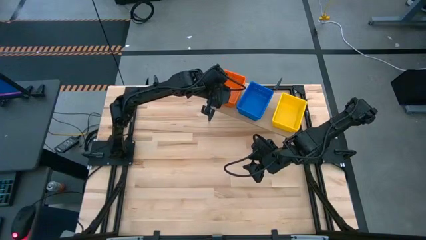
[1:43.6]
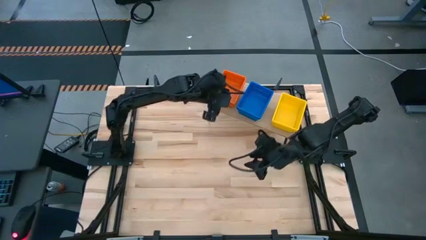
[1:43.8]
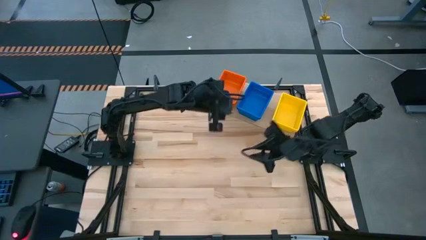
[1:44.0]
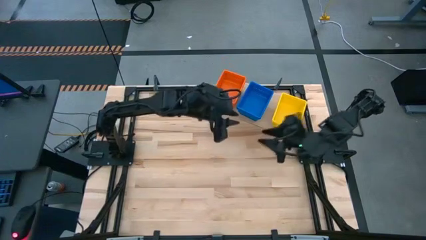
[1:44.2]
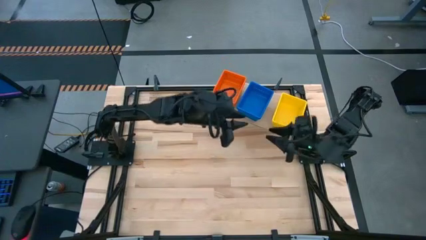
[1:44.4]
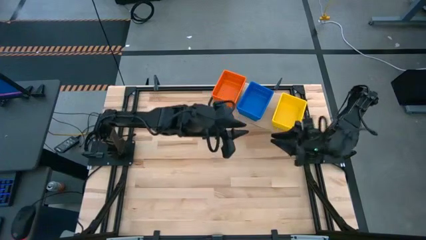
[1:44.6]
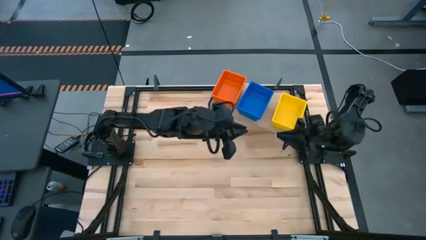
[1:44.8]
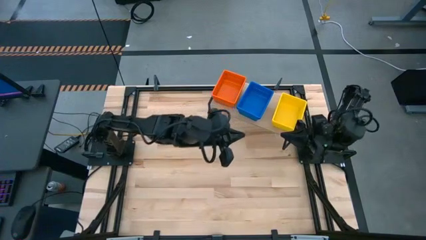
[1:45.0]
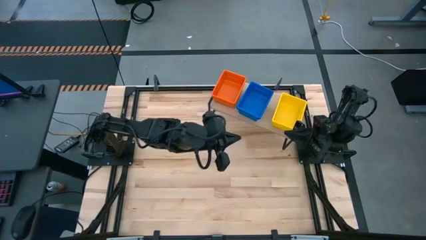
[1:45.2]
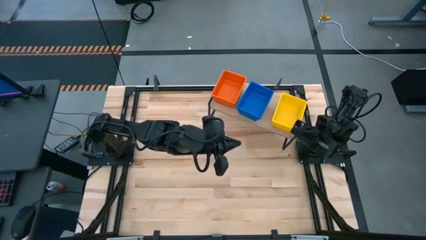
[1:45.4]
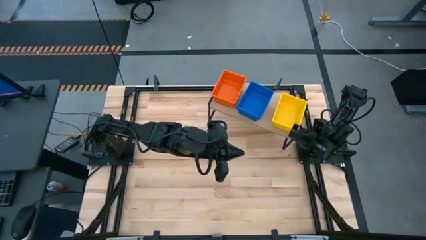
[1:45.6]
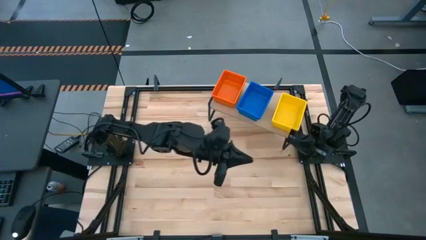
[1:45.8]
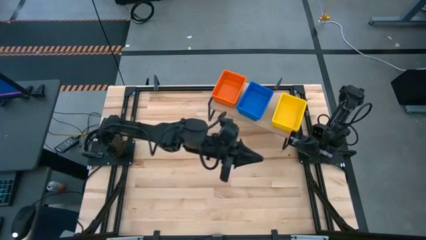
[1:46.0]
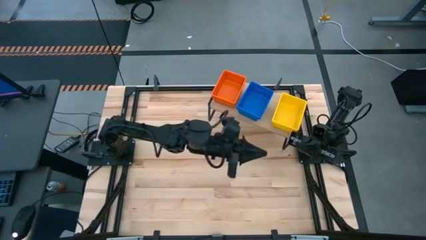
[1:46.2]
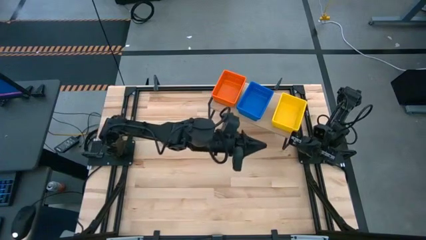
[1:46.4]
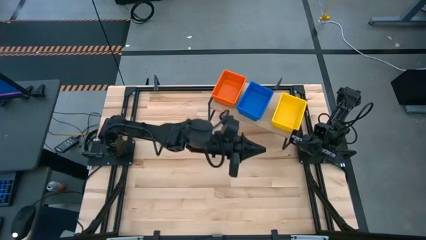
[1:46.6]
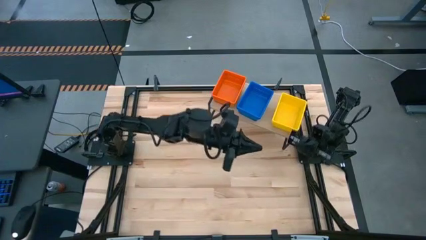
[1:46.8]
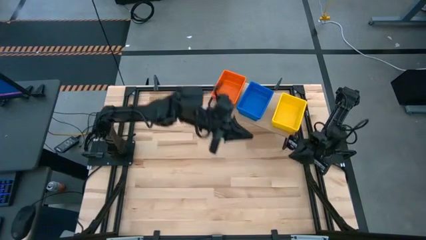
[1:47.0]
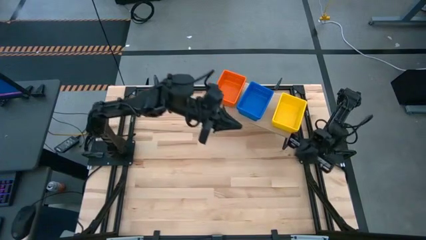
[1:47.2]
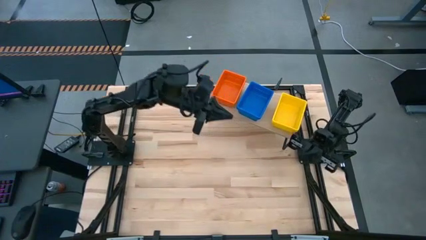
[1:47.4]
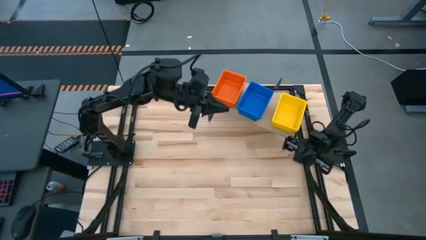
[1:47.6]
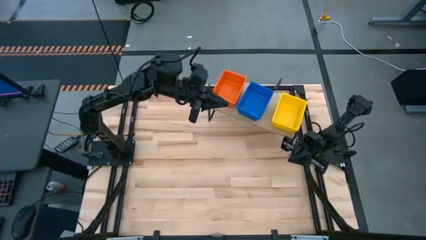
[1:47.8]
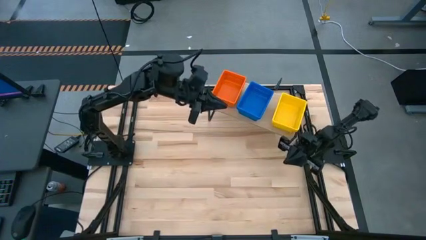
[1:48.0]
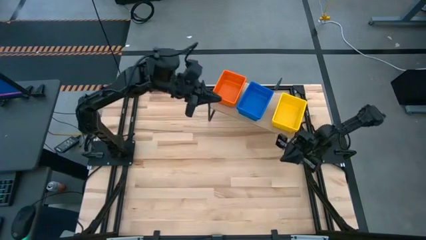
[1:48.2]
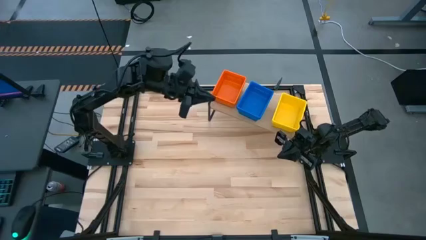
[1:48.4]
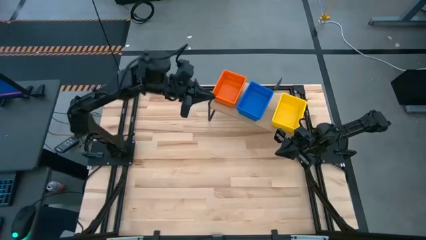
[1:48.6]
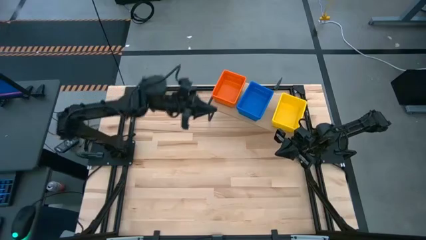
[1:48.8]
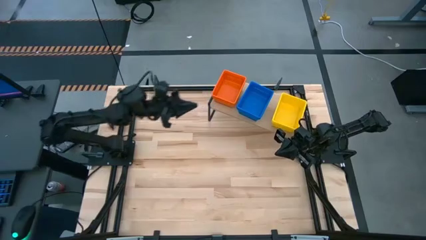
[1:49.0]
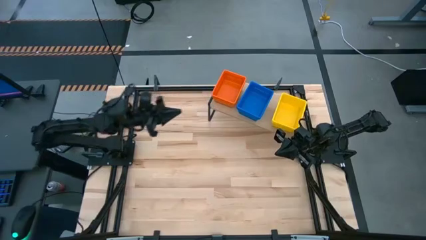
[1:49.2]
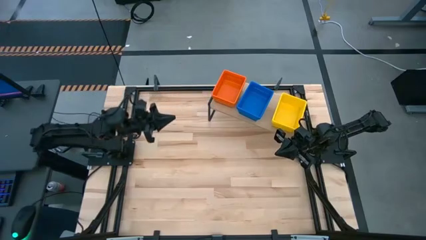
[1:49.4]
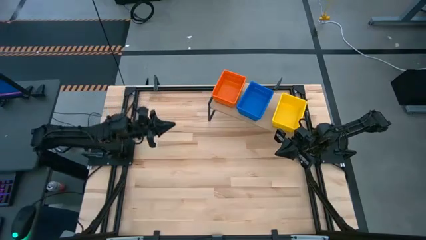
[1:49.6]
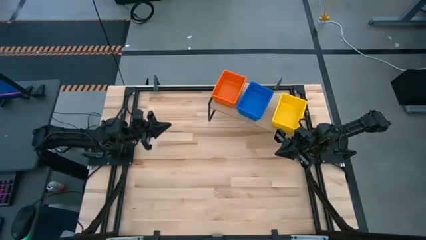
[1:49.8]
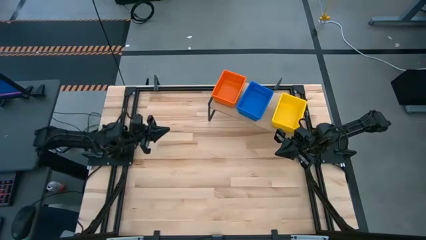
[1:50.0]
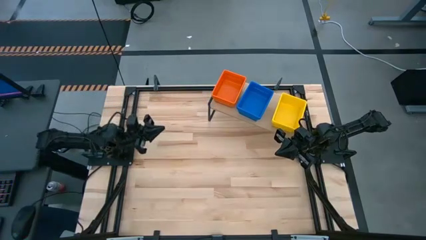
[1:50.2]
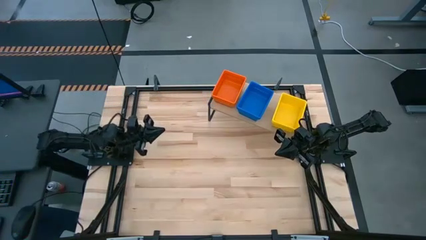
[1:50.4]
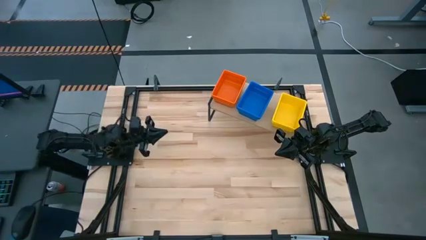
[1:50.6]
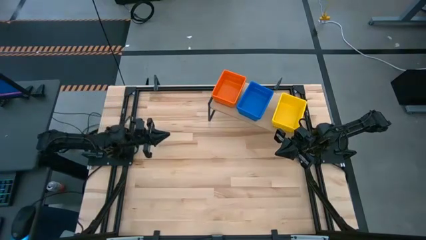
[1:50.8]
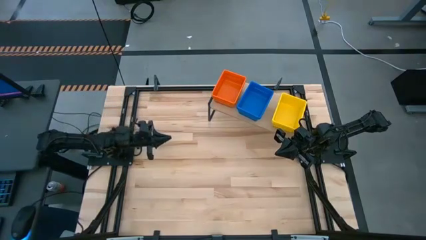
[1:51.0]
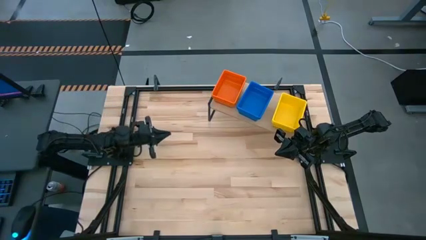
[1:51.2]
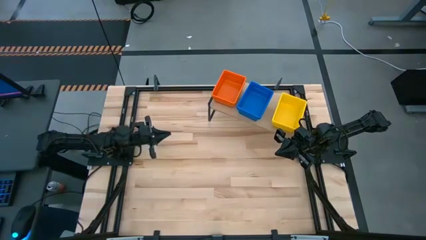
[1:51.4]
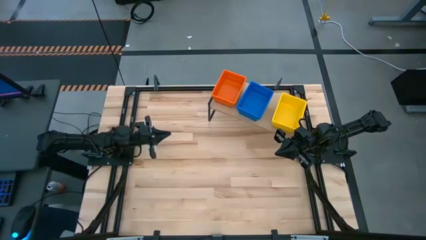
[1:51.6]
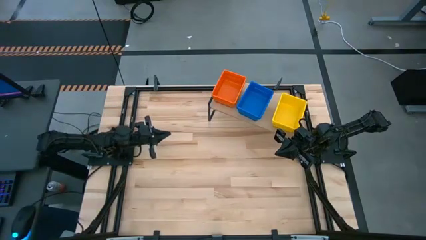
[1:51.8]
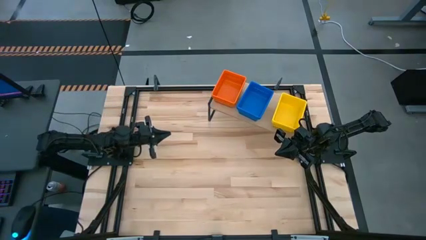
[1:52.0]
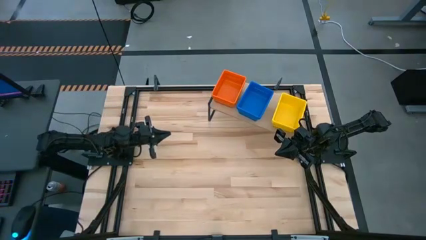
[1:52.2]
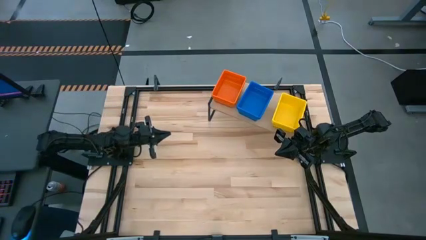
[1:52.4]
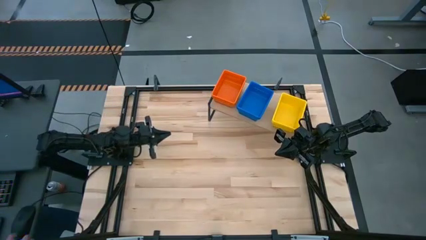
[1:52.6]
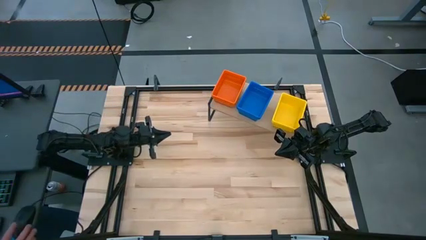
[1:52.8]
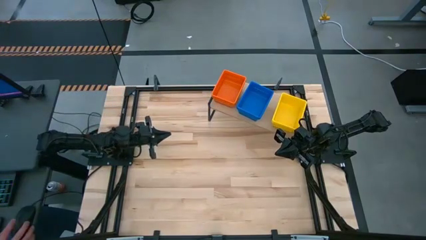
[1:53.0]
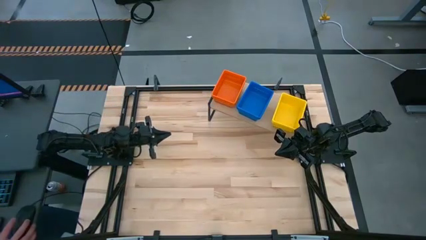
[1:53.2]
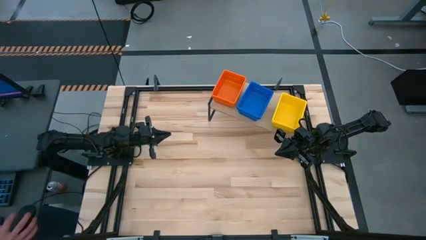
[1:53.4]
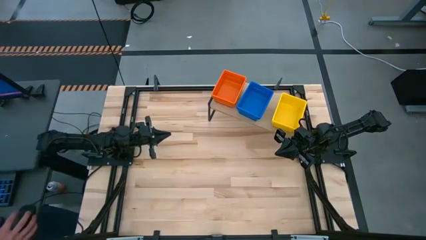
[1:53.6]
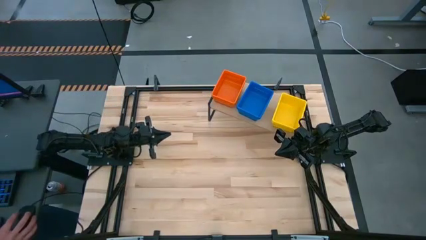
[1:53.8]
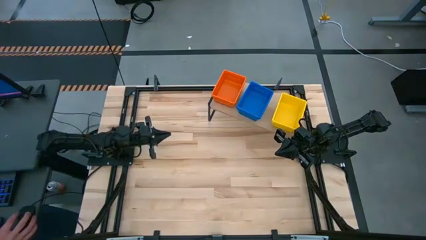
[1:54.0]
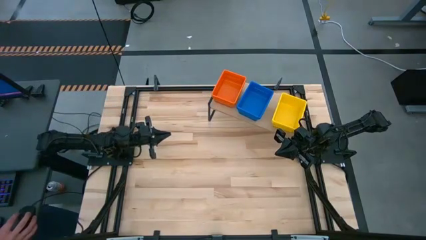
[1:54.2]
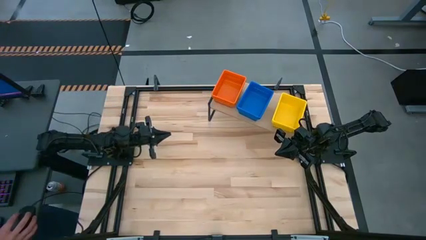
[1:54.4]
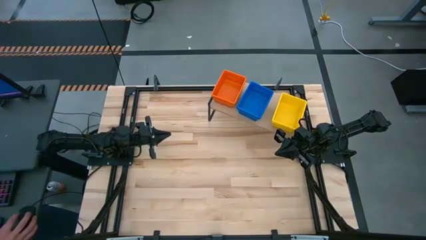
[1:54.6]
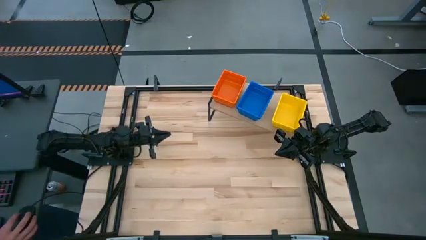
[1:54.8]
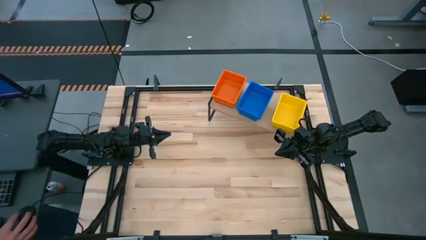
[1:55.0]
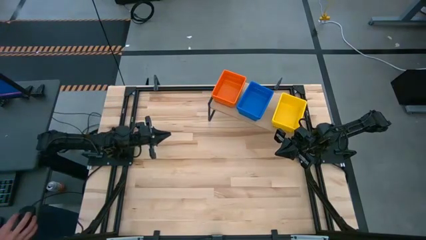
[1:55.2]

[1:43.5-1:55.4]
Task: Stack baskets on shelf by color
Return to Home Position

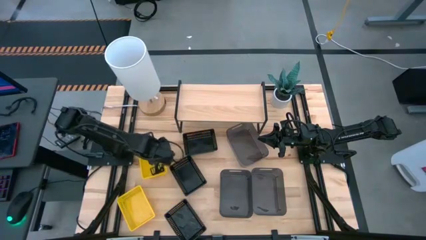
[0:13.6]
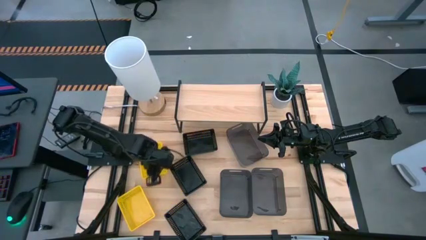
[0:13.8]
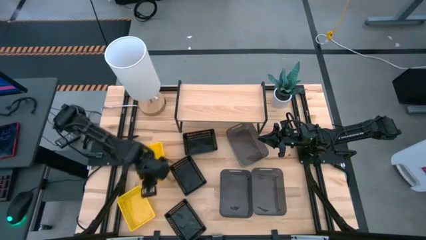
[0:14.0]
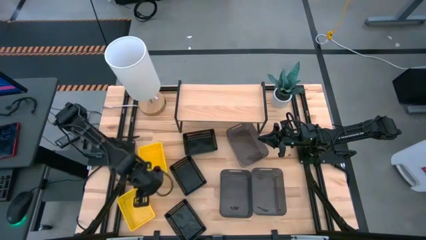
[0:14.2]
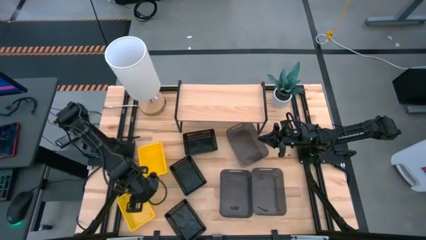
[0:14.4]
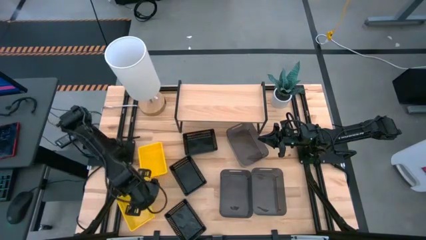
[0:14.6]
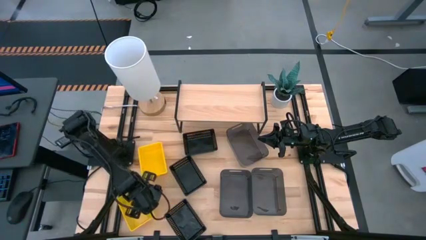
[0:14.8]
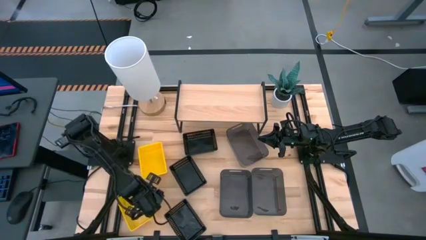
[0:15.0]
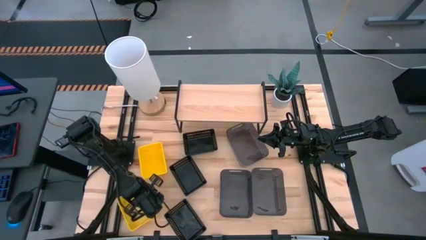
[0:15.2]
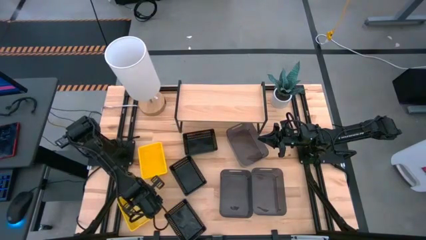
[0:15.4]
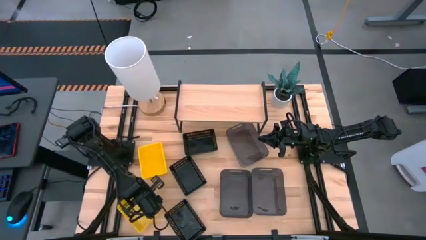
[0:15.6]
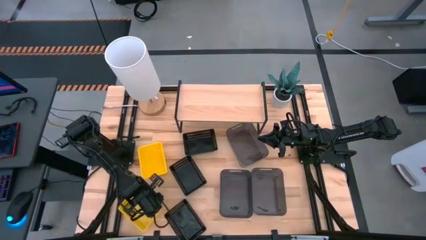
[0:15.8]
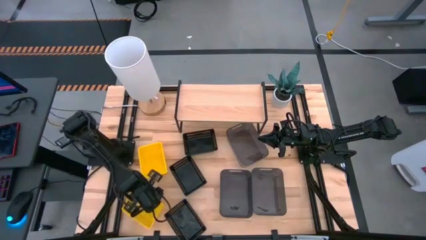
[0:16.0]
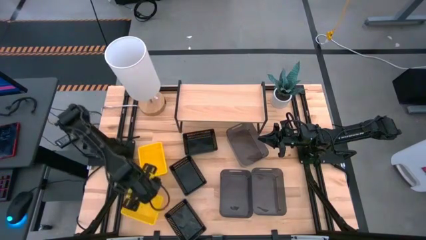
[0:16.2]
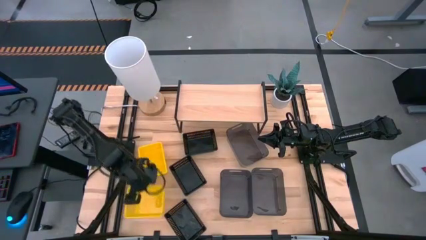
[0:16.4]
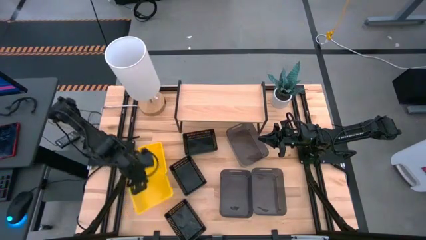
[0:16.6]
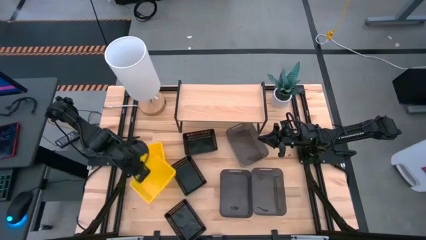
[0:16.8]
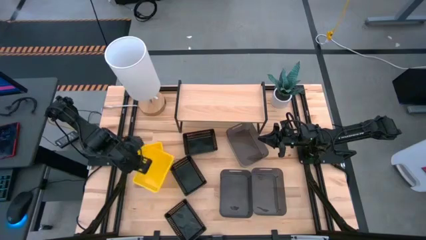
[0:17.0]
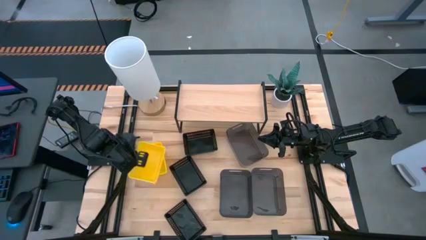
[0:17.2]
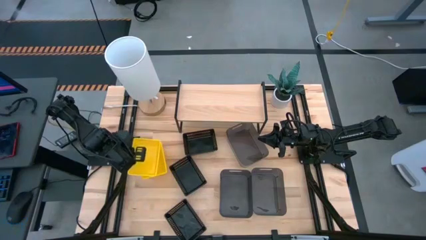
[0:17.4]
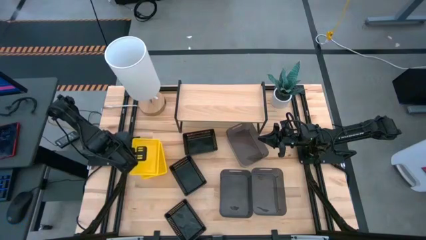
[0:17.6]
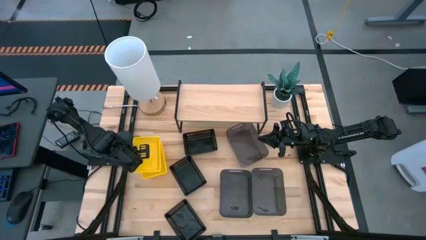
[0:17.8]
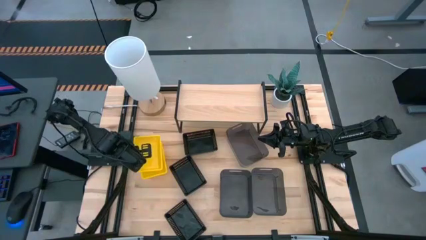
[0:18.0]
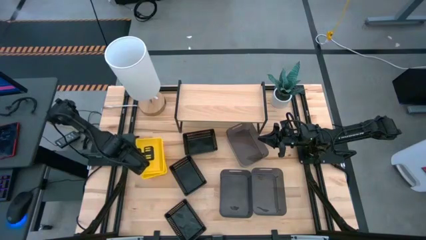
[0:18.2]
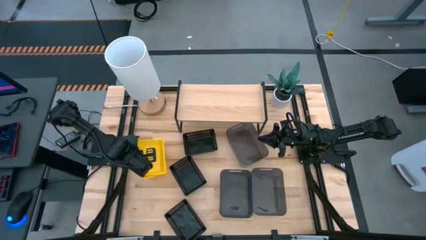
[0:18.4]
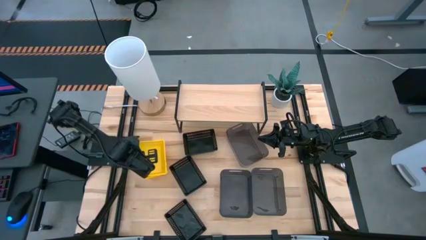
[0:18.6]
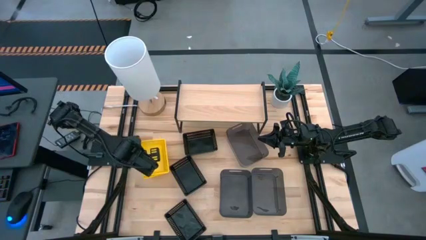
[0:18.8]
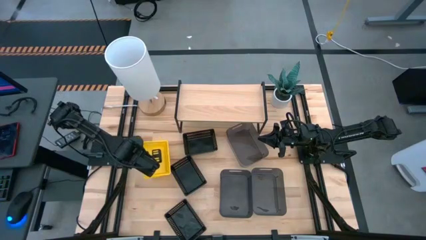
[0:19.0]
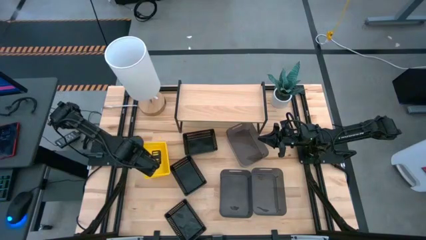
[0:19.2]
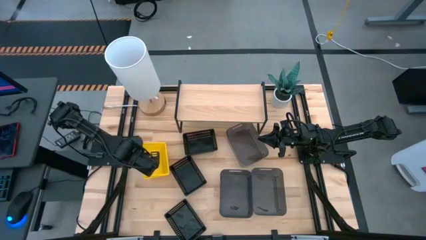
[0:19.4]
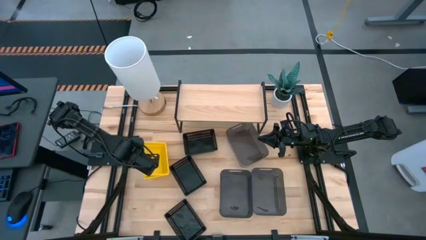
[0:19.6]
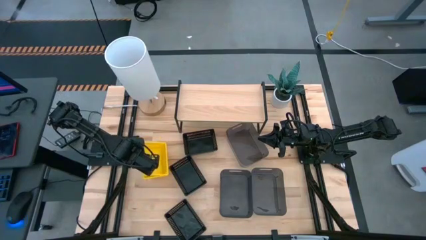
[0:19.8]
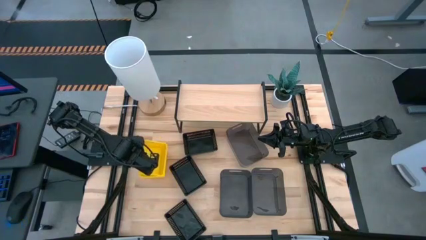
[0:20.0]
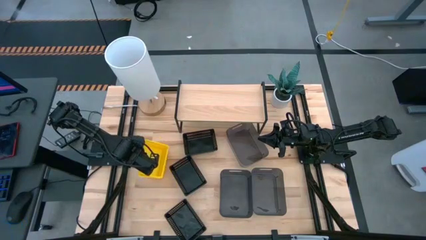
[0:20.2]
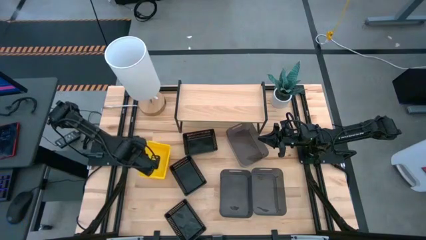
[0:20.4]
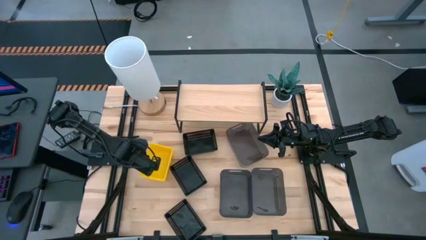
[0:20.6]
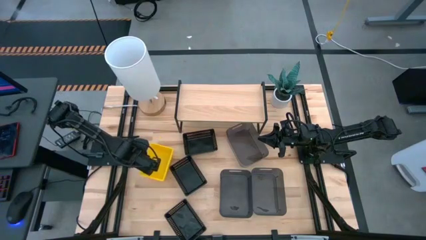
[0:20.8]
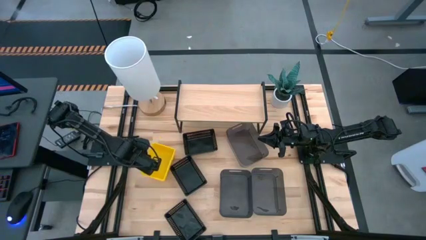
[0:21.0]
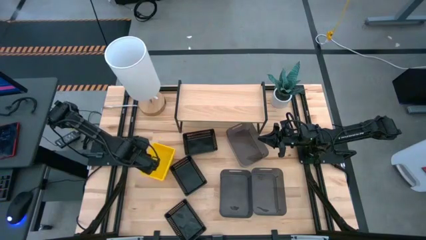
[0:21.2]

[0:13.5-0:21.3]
Task: Stack baskets on shelf by color
Stack the bottom yellow bin on the yellow bin on the table
